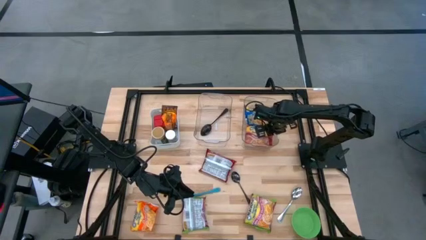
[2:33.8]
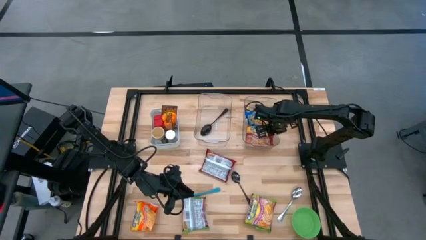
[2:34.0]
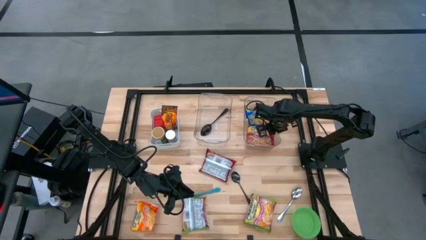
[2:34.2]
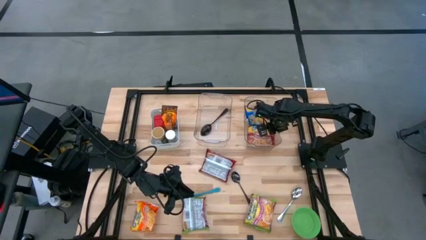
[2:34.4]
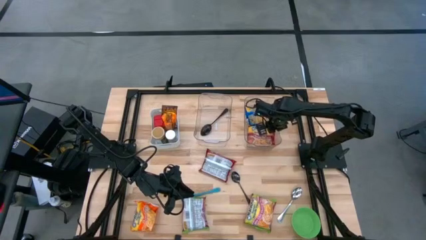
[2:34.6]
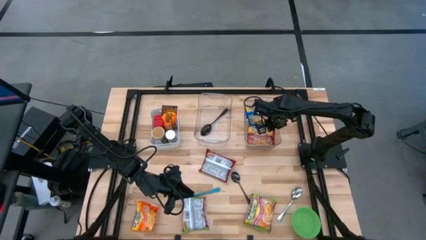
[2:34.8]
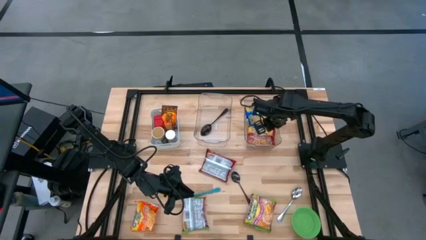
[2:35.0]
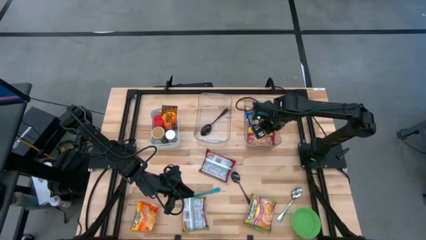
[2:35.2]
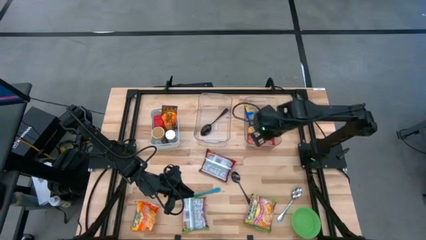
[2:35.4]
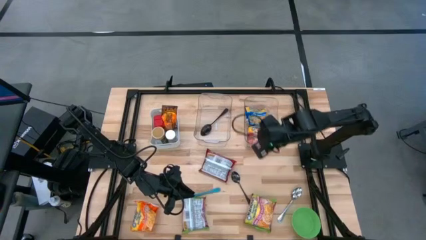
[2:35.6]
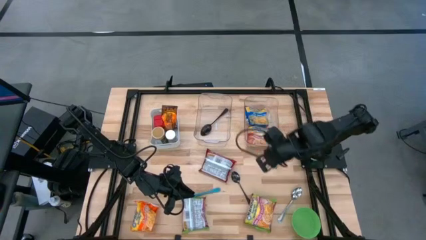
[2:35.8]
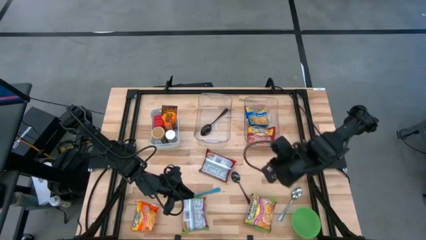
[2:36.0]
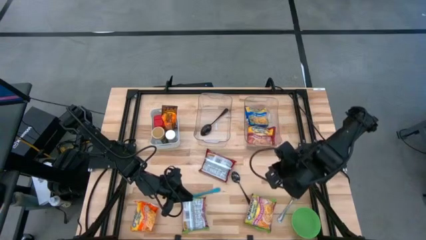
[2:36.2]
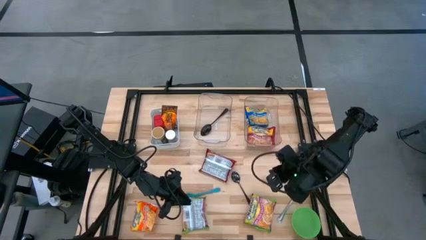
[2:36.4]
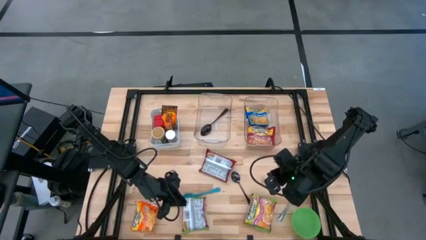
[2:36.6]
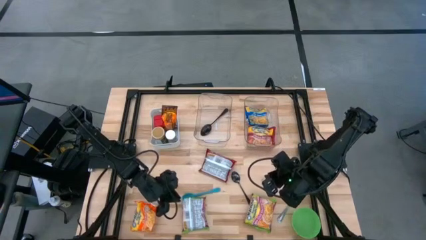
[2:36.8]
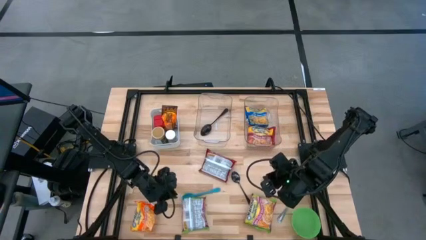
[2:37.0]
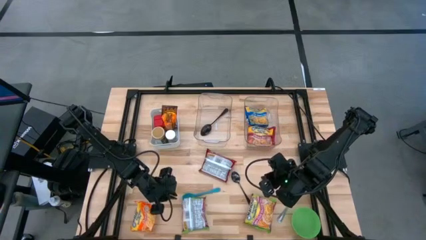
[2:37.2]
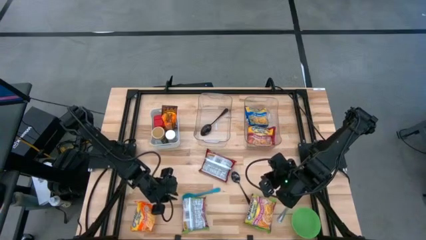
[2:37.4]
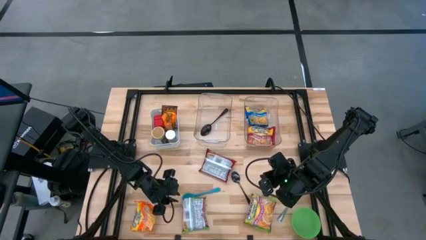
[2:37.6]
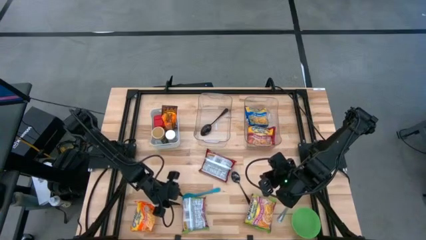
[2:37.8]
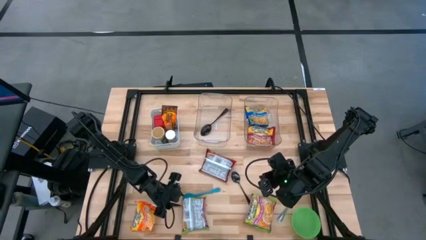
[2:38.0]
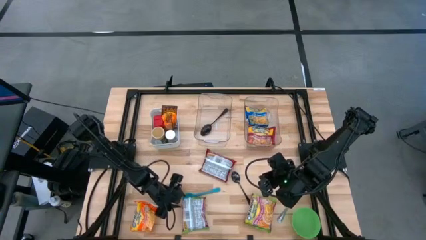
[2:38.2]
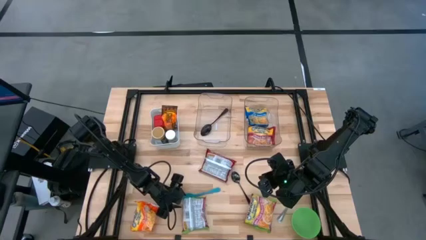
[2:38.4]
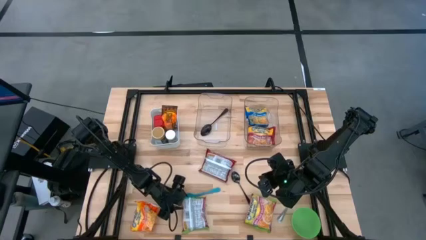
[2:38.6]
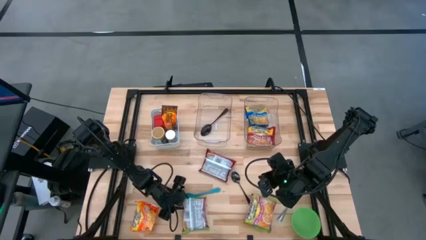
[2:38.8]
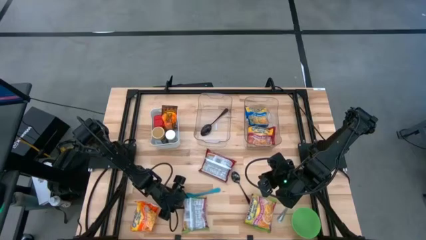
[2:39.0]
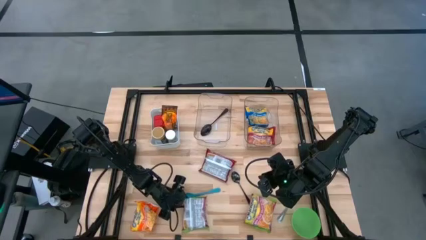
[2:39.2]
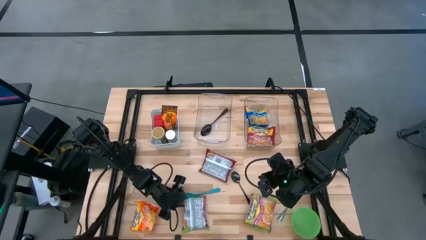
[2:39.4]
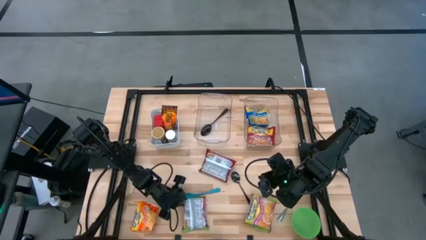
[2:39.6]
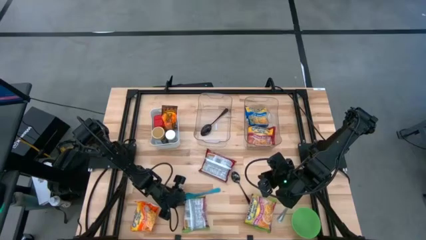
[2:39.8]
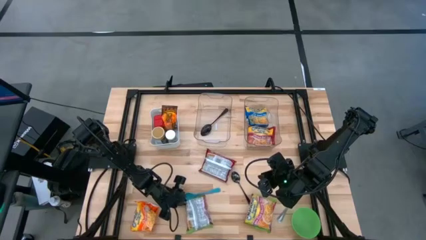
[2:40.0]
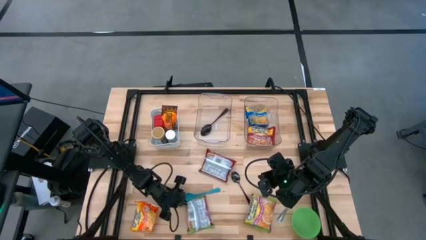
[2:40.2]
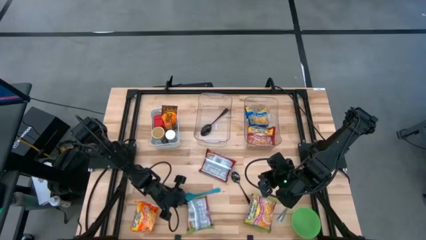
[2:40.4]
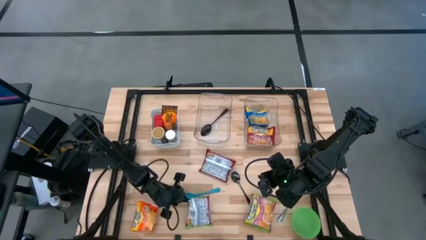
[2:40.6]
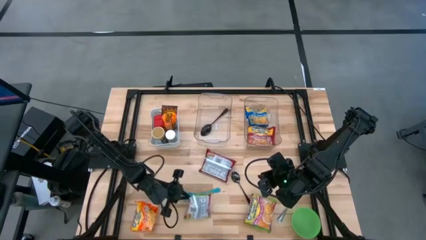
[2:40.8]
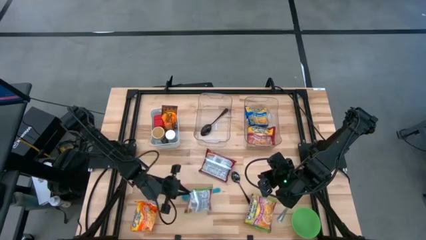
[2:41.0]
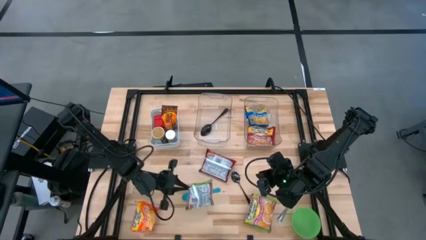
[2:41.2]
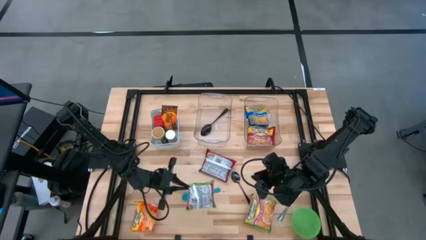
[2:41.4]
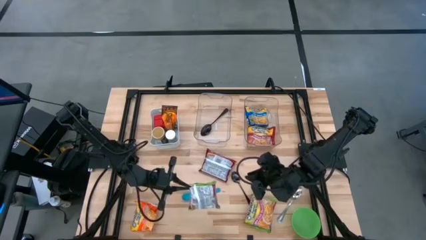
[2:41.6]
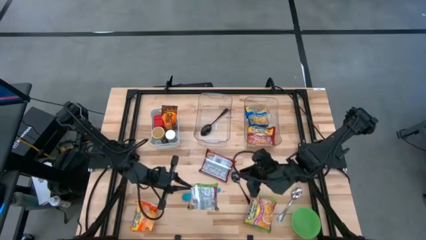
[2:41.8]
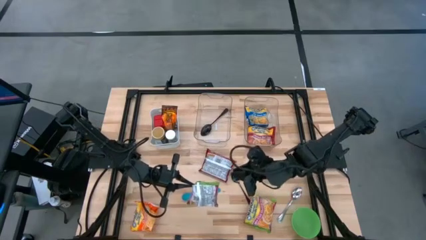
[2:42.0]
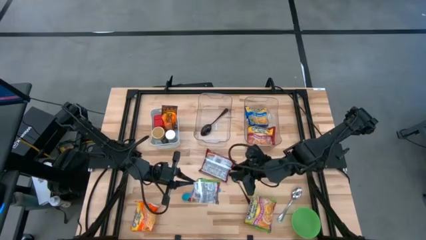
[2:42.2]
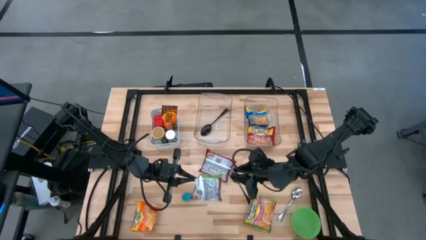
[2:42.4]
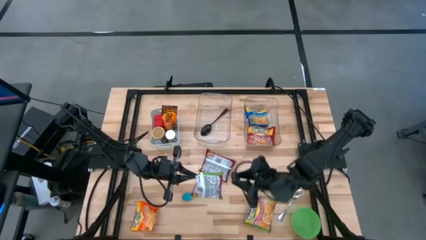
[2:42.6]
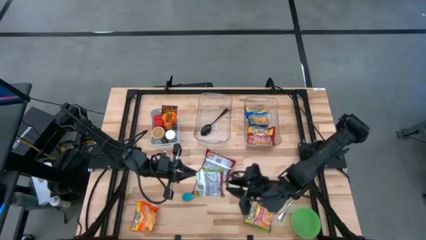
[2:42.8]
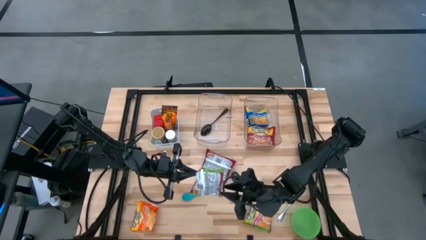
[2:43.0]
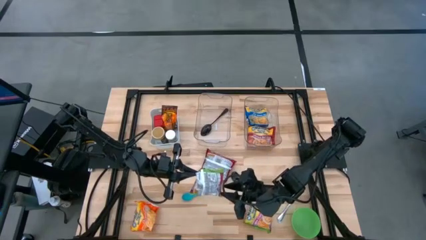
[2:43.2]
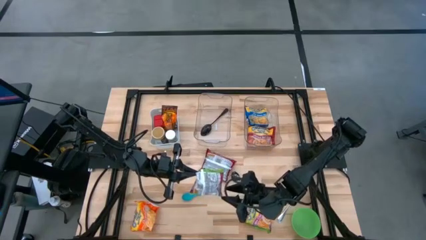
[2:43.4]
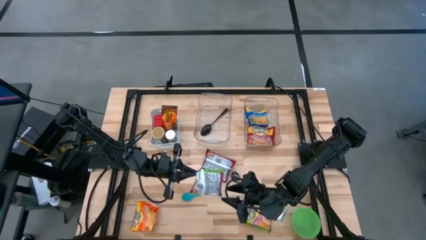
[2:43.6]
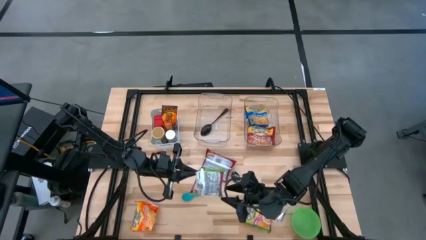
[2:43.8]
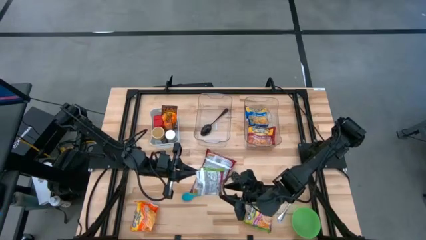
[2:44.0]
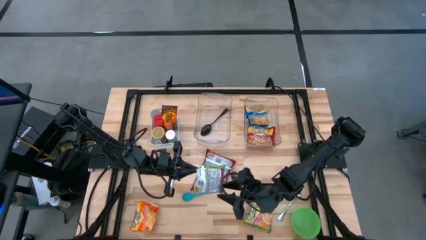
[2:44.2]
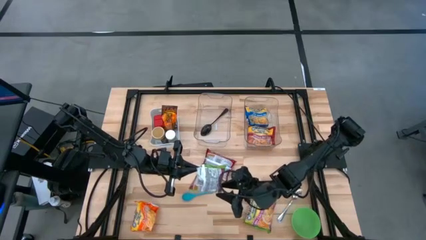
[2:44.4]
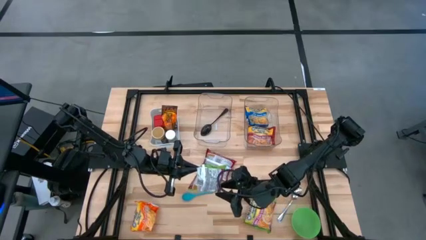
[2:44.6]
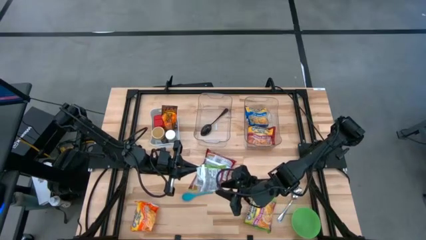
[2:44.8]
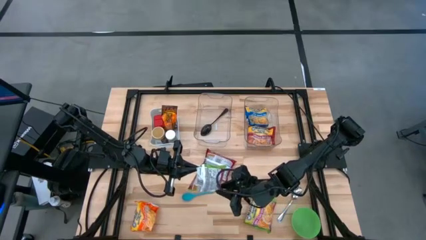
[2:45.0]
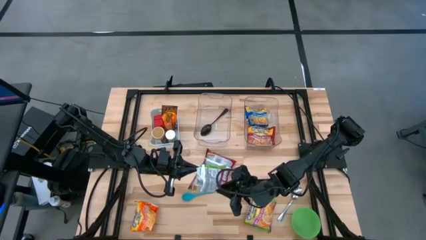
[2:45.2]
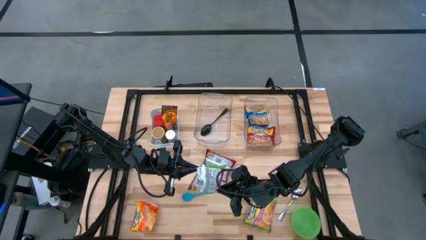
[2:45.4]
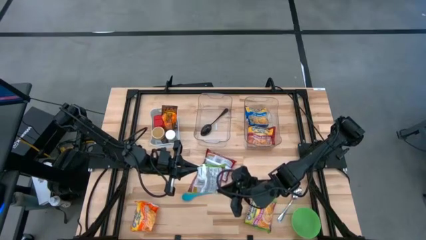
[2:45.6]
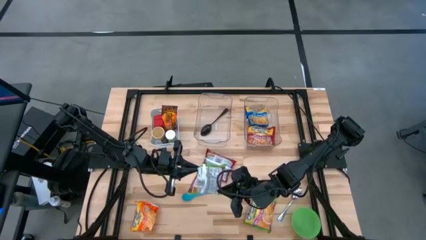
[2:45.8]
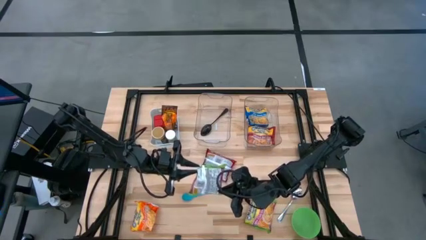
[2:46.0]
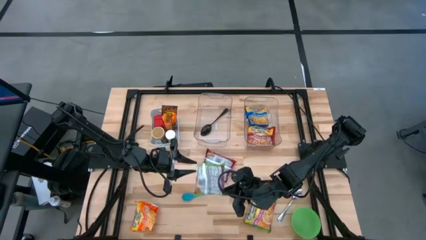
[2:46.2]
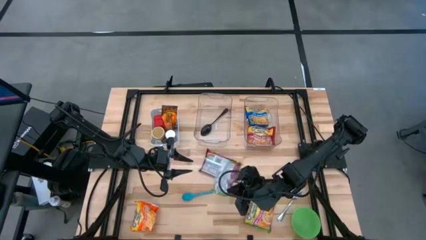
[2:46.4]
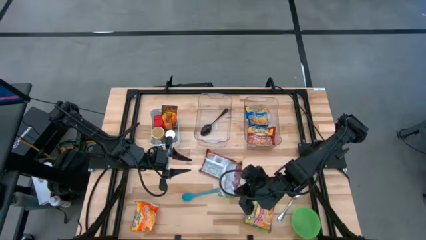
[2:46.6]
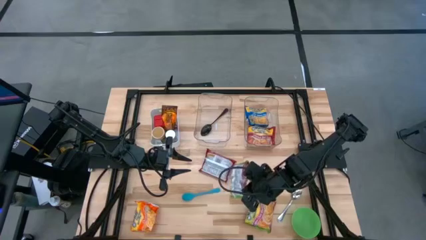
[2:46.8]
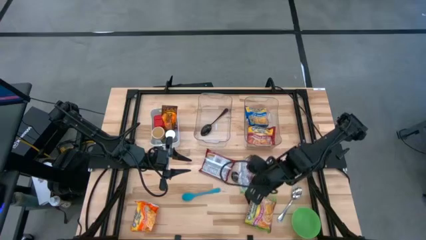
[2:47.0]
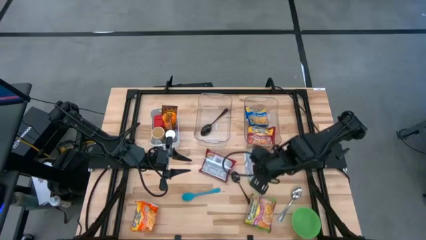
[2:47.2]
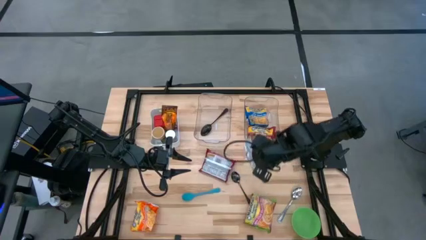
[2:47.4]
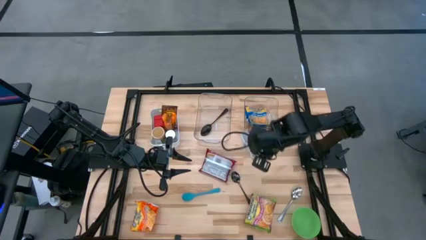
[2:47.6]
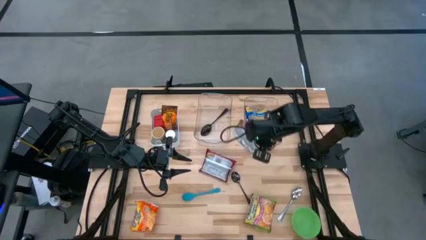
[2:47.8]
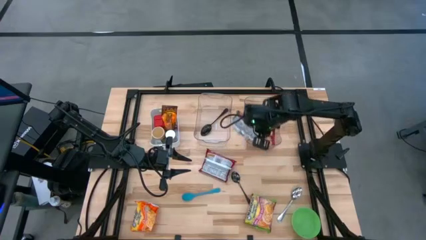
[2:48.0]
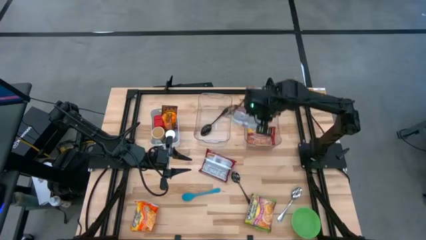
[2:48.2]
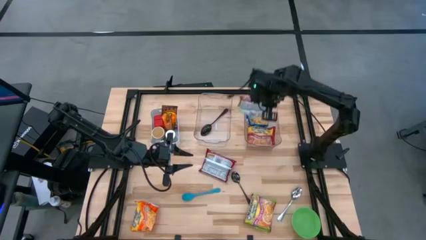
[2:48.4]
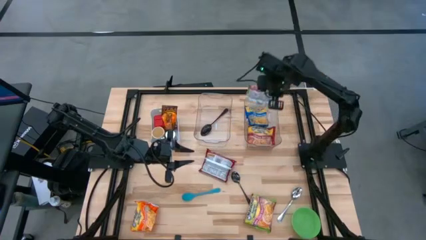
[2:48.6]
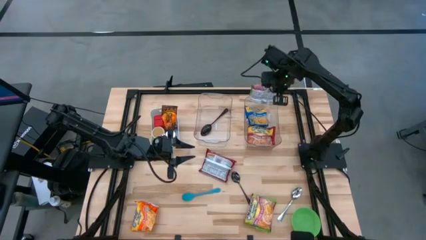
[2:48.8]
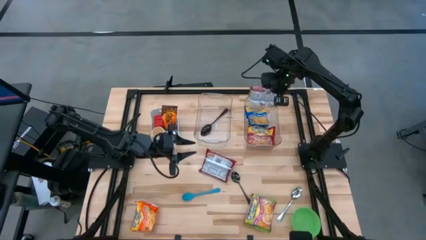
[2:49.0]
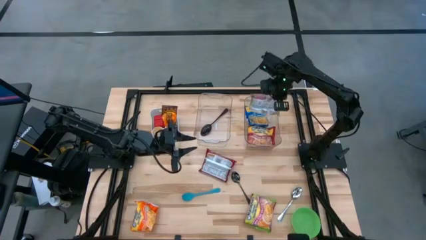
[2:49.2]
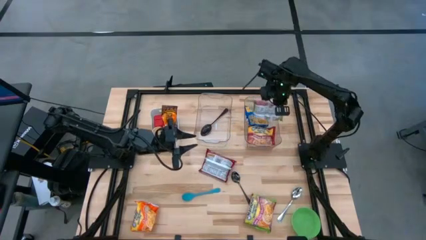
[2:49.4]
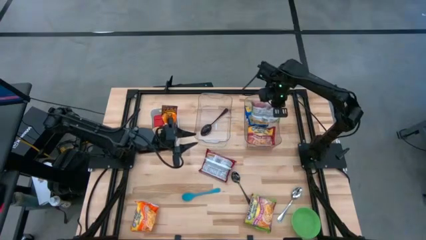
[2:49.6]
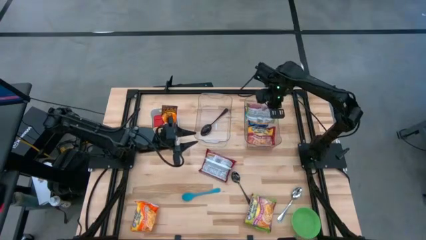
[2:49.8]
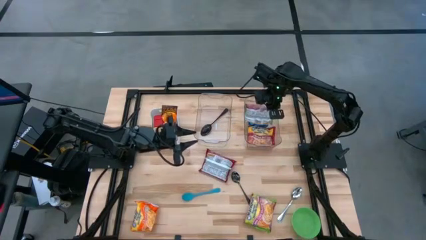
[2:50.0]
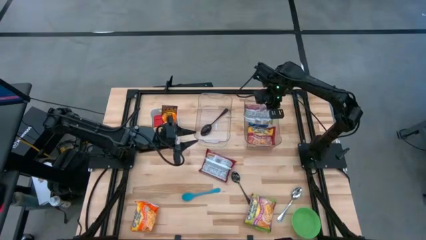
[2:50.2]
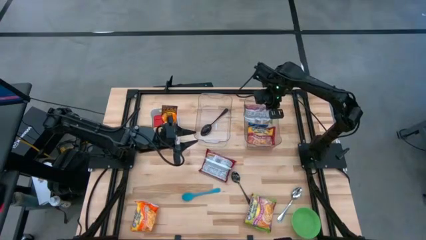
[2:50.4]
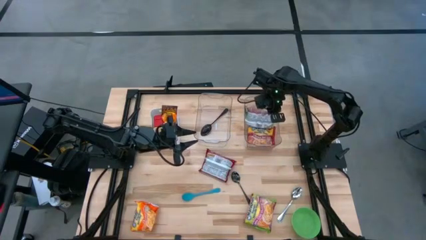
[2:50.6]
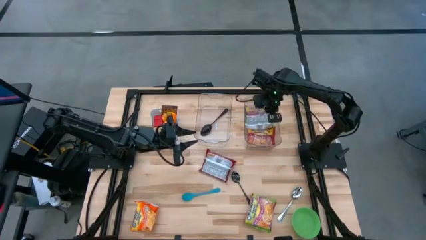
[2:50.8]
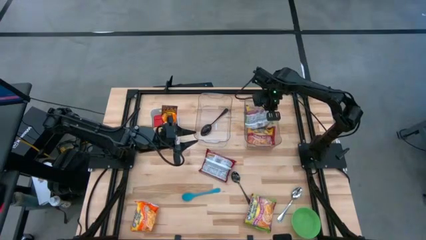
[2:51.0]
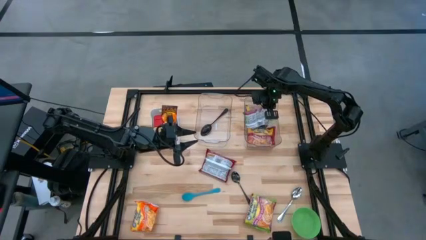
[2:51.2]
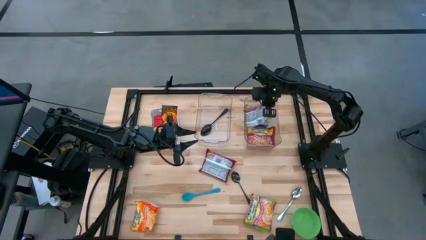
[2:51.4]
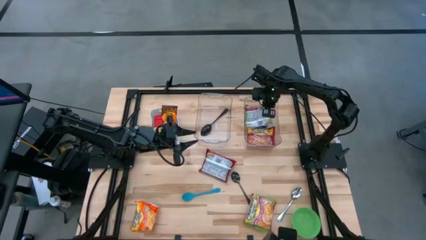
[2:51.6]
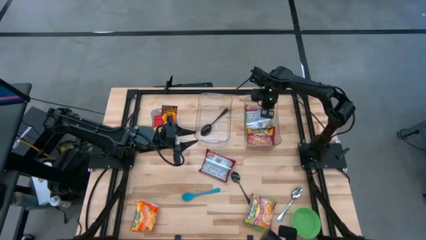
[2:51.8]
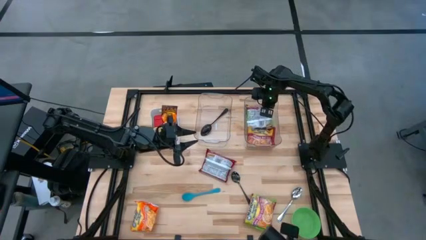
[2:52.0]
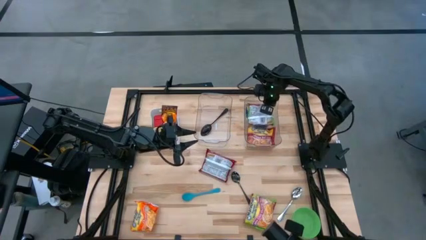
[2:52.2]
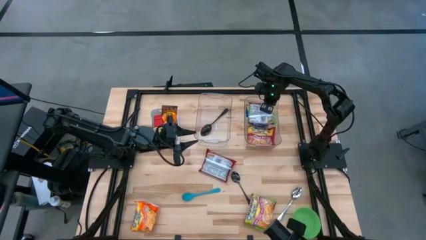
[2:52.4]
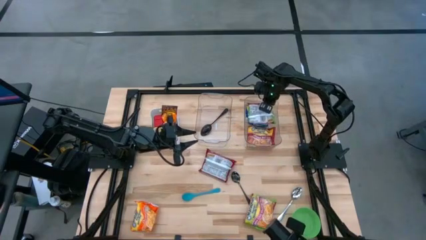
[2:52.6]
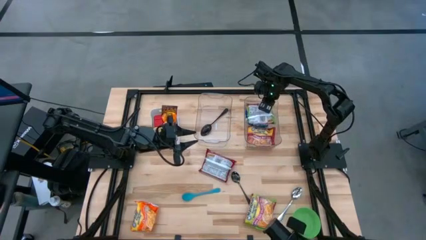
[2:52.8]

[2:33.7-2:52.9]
Task: Pick & Place Food Item
Put the left green noodle pack into the right transparent bin
